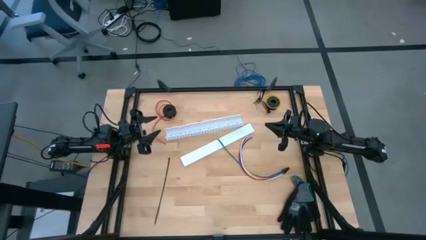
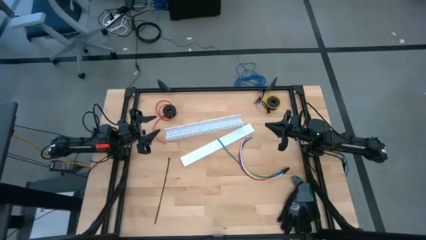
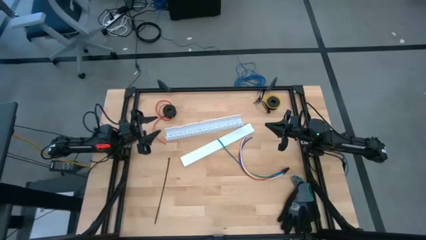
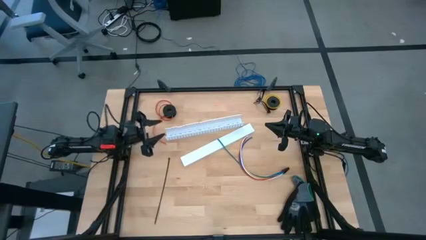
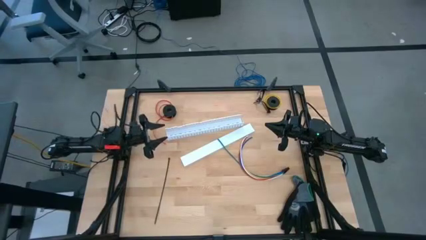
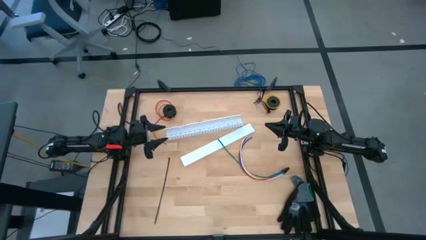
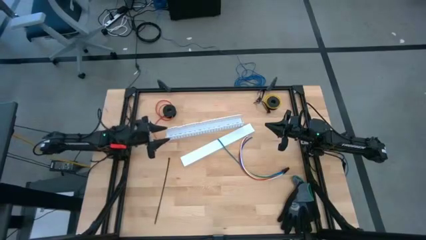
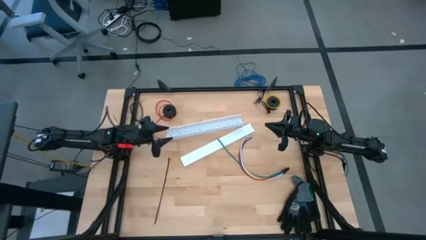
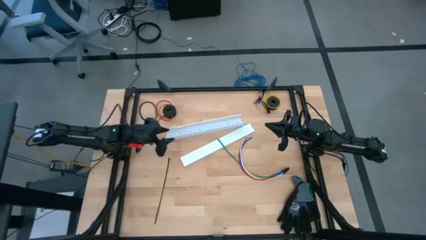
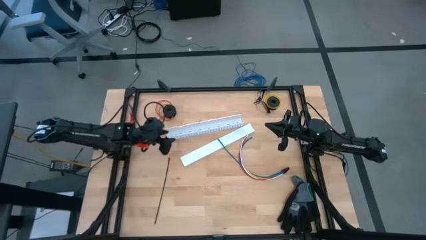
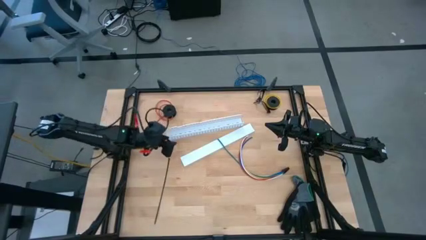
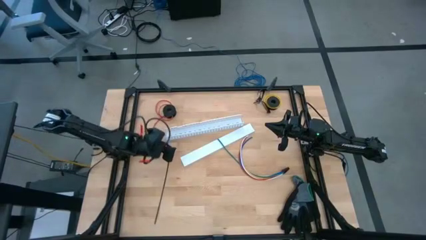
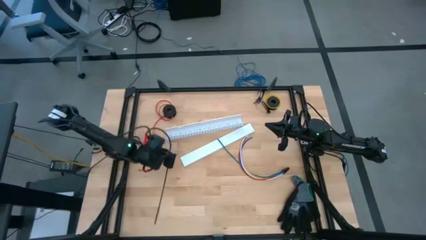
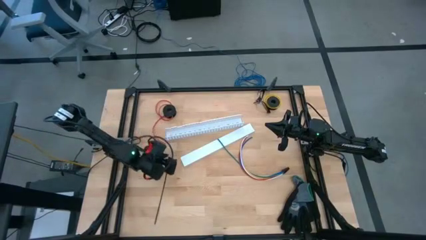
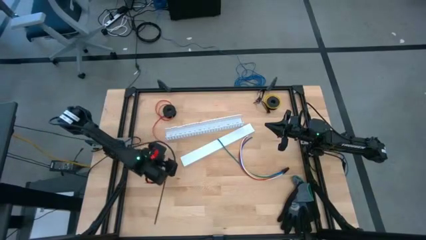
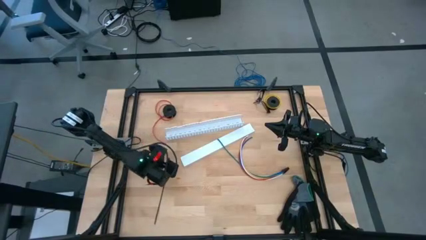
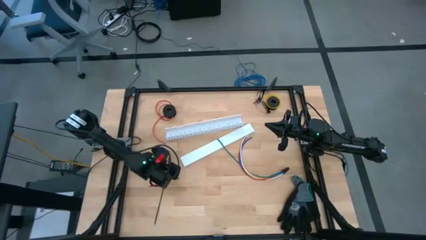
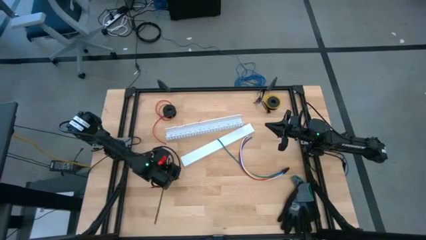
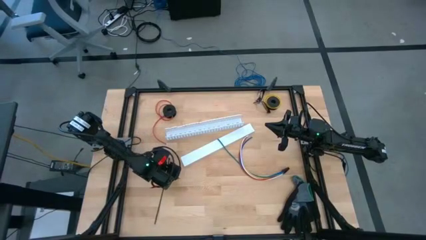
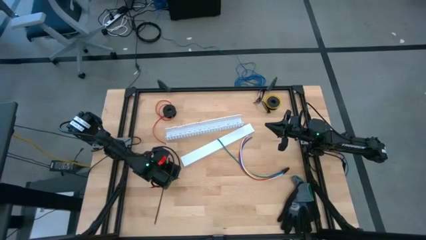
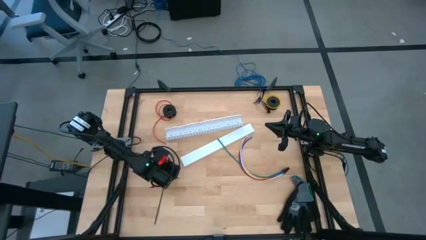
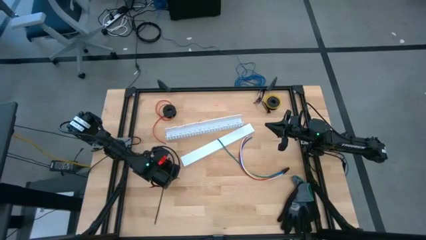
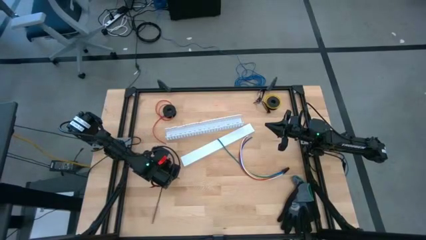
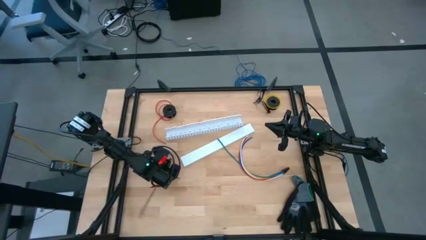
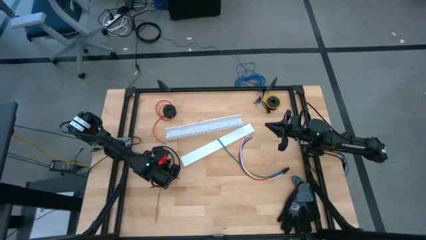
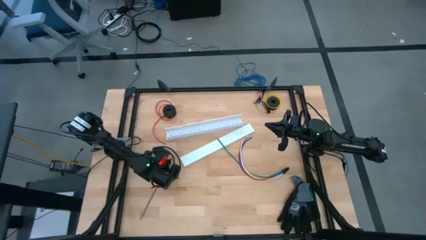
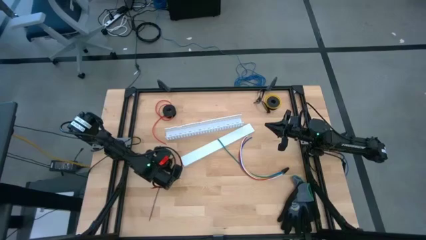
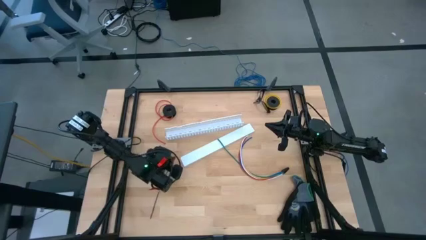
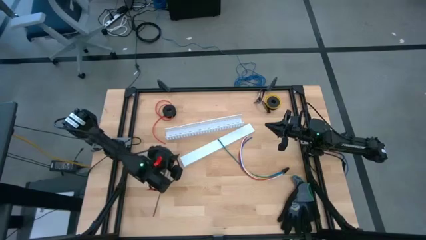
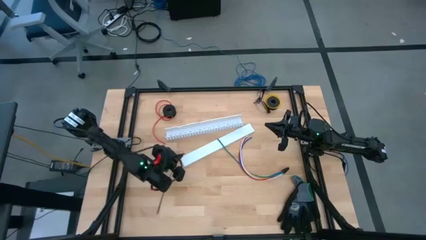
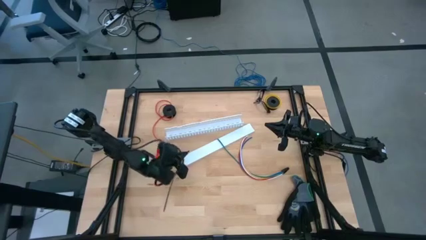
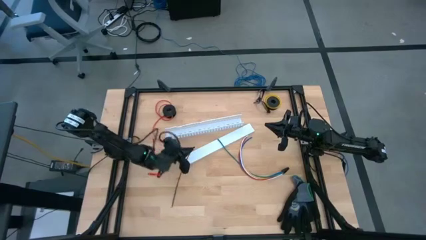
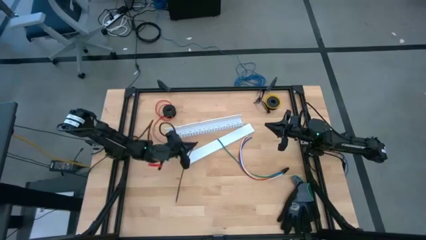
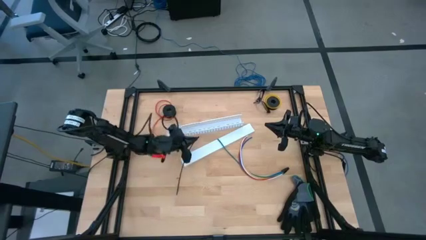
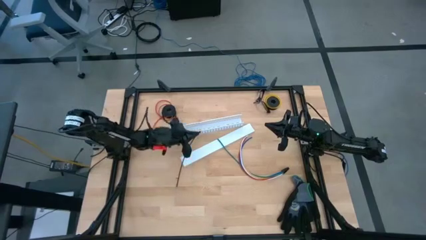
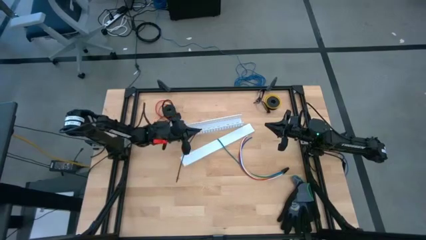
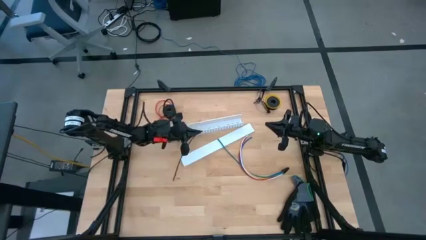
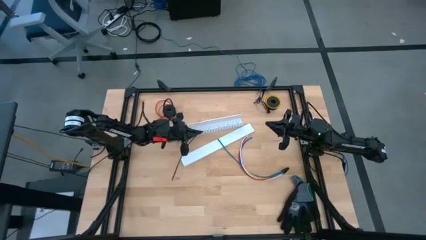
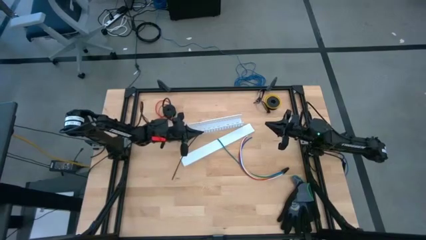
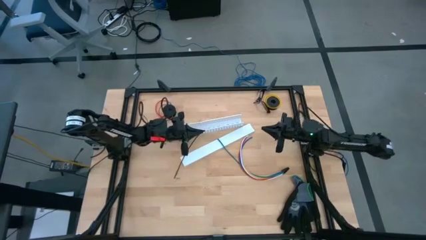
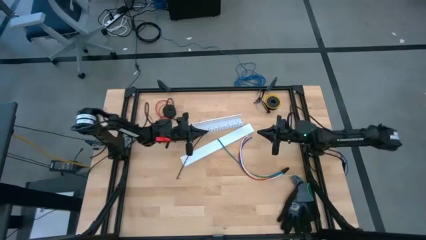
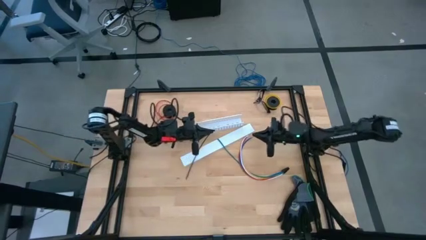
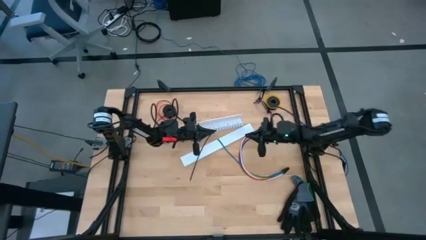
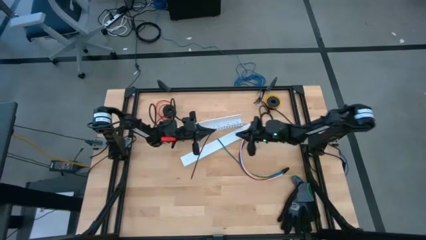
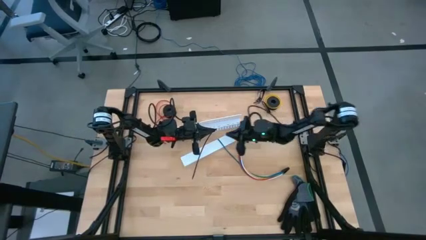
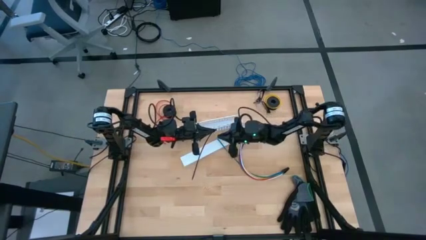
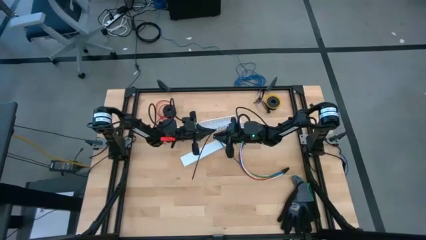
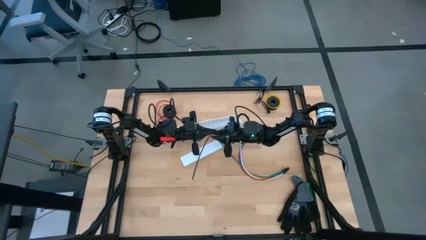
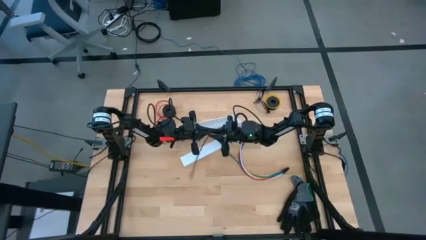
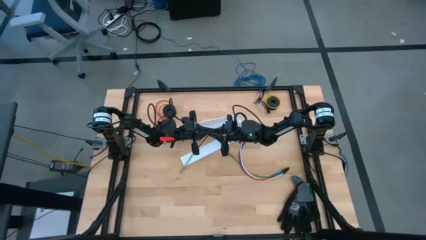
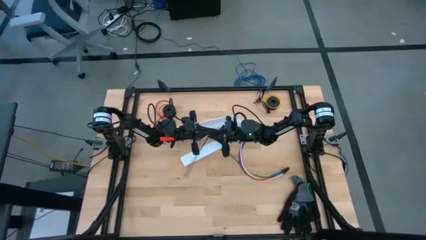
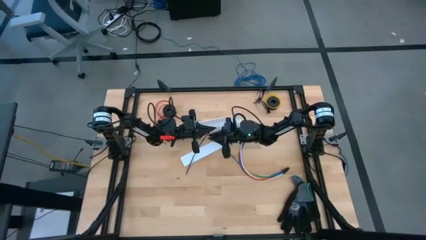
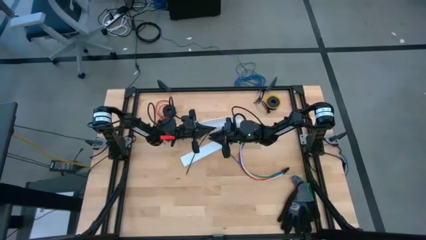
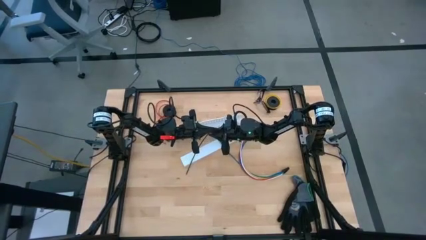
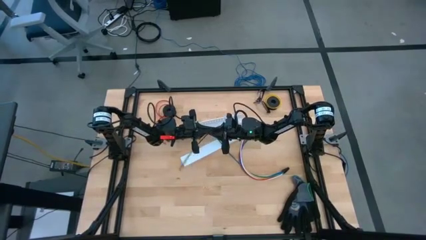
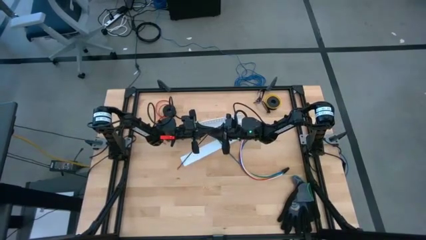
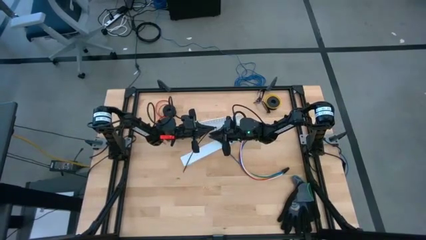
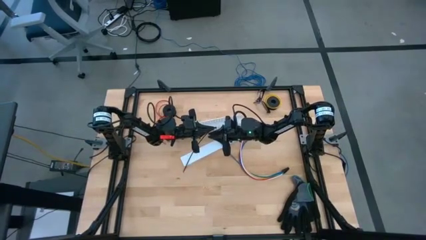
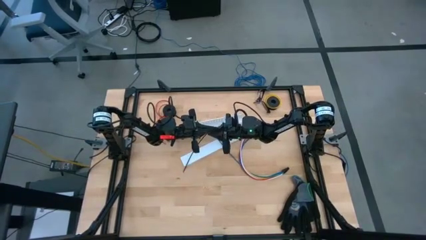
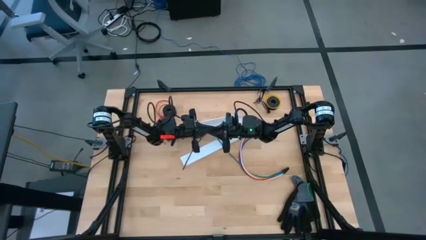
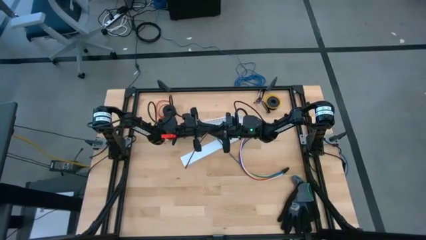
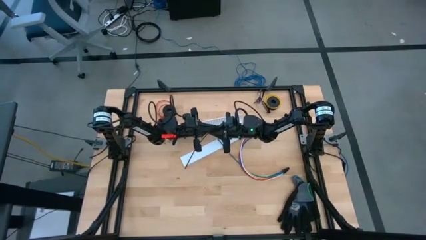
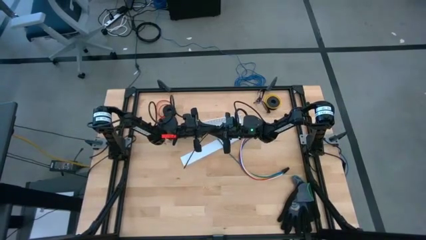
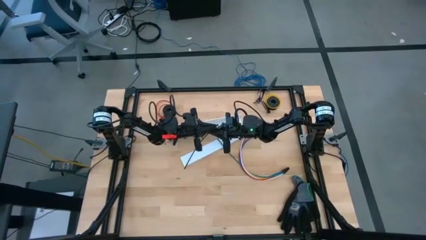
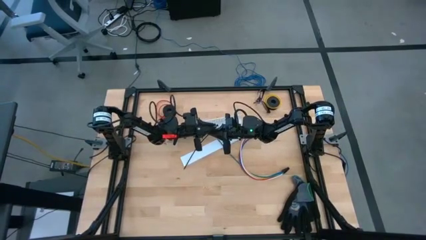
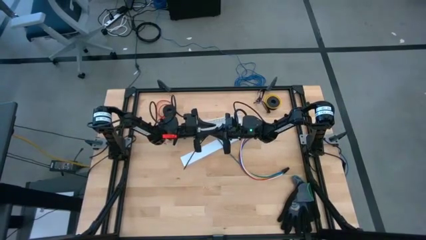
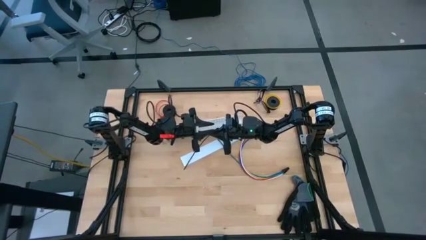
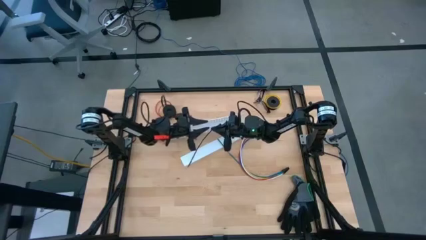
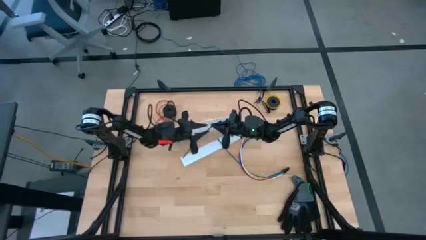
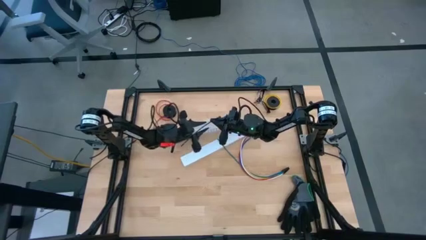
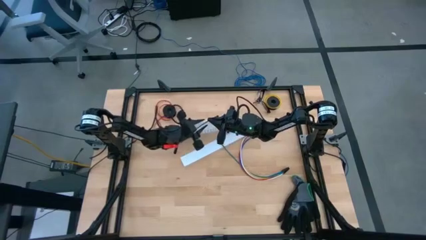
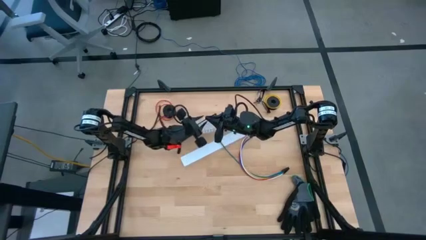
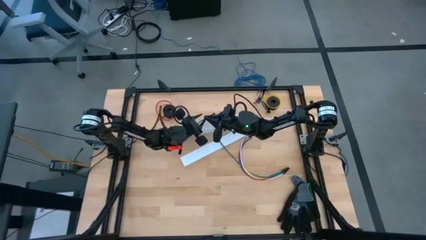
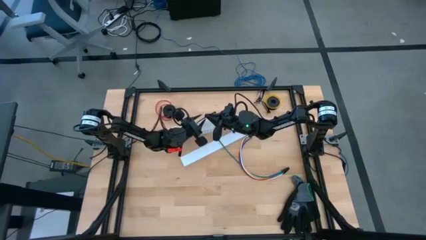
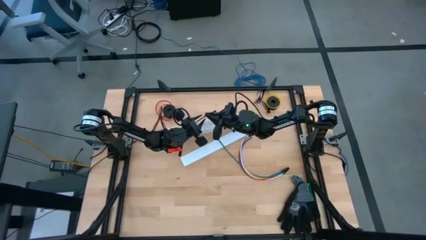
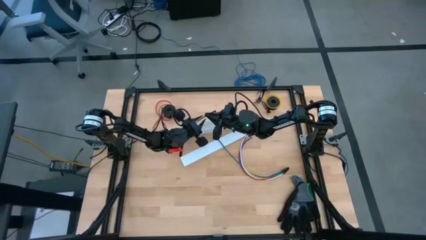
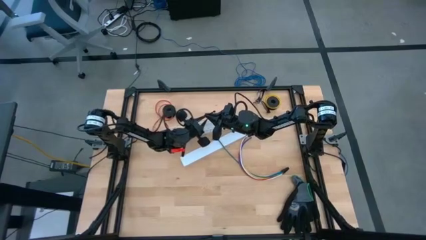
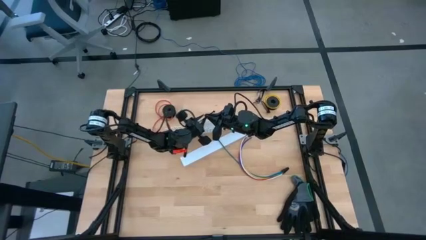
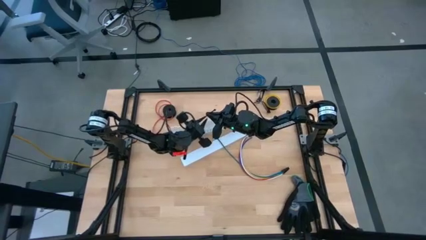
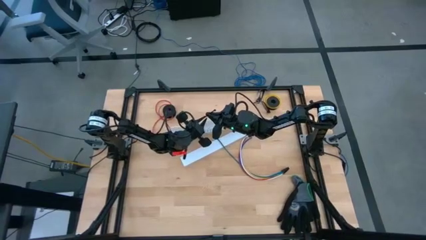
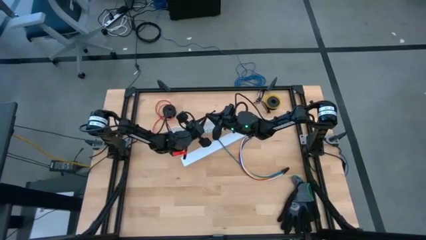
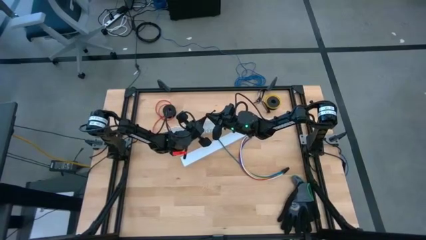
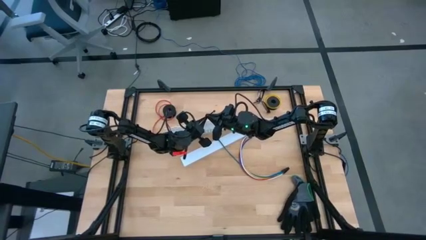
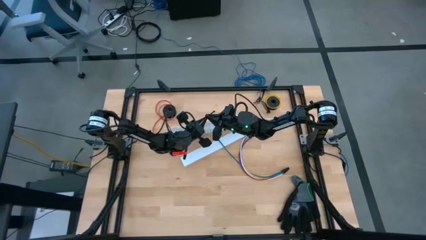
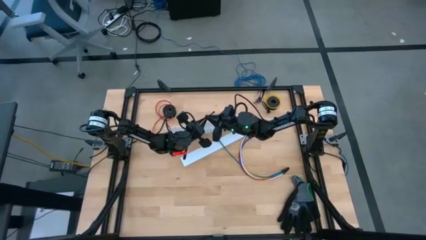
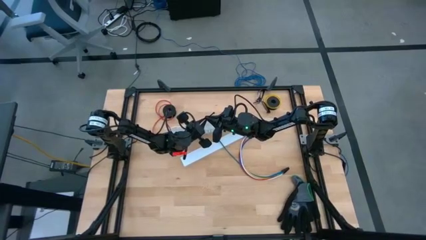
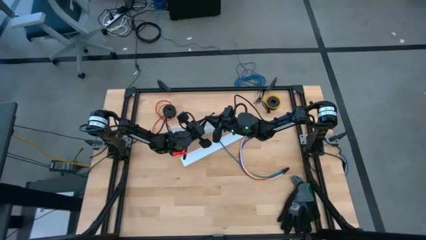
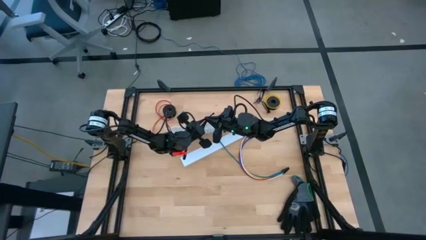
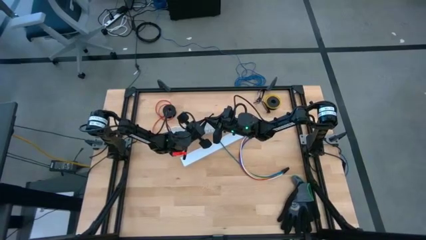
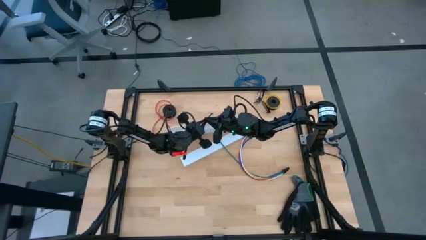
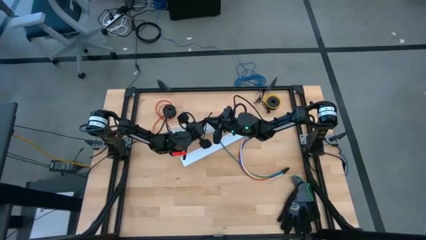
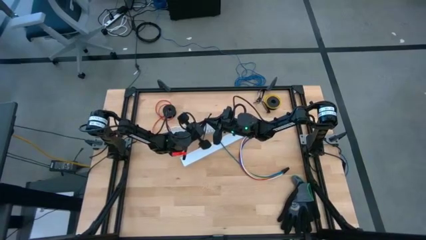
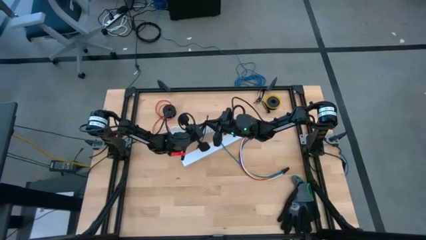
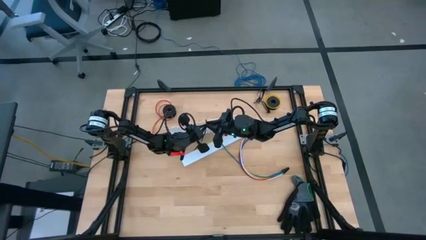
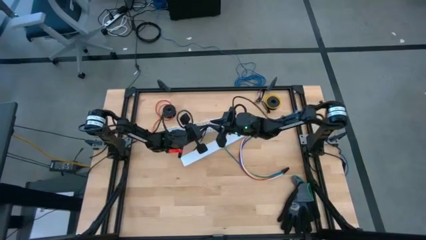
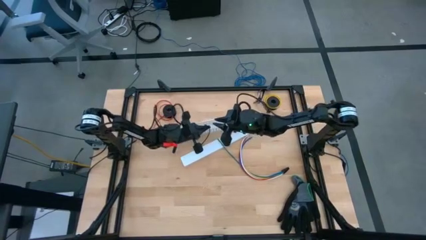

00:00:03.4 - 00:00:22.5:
Task: Ziptie cables
Prepare the black zip tie
